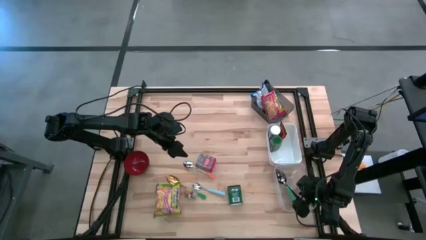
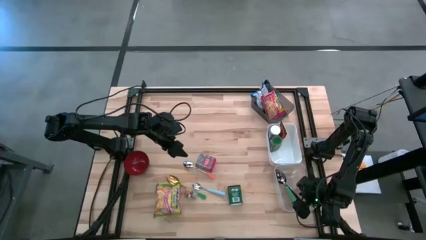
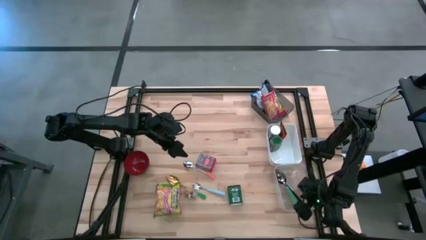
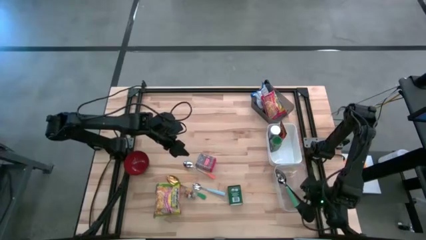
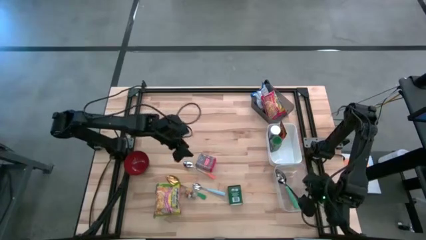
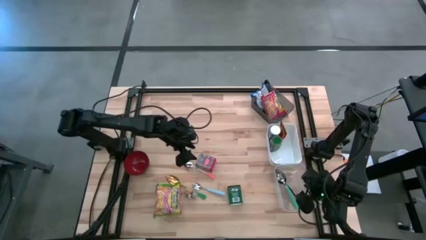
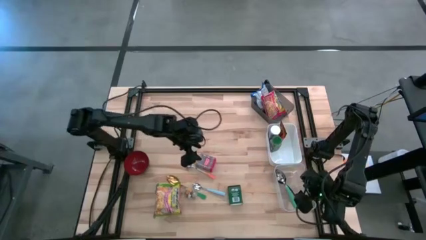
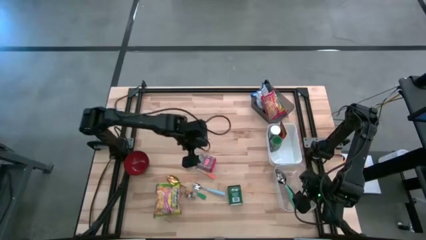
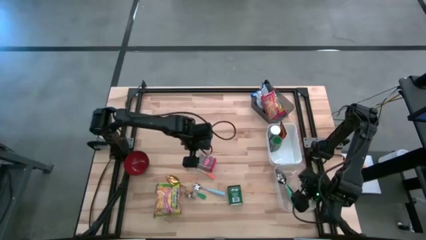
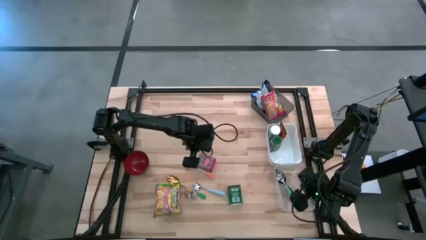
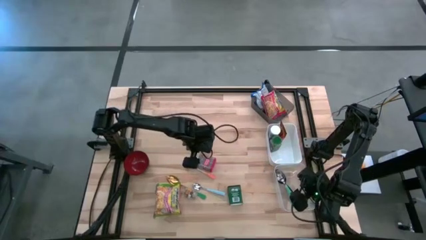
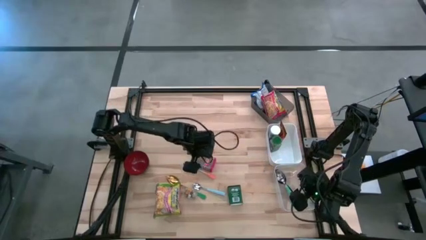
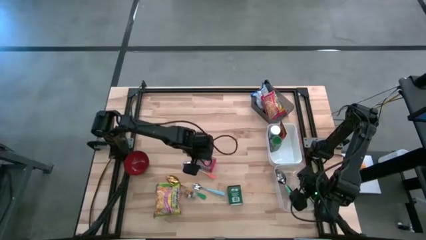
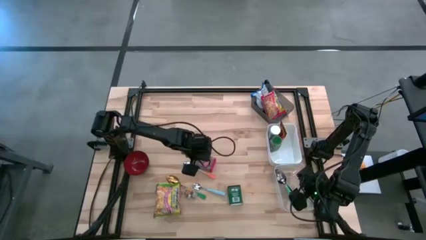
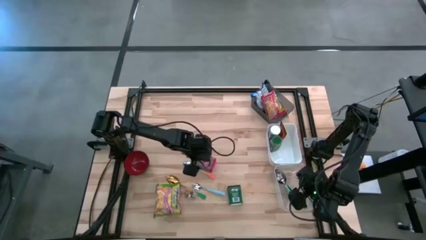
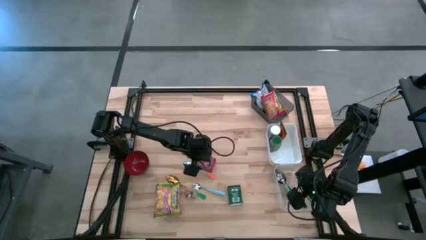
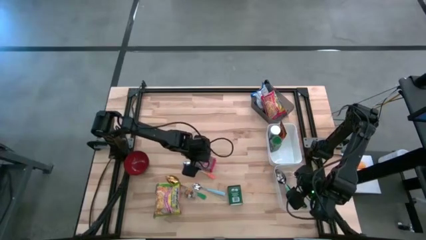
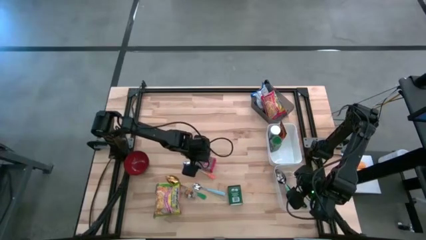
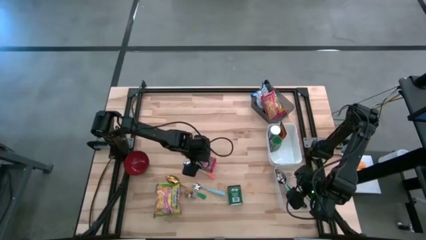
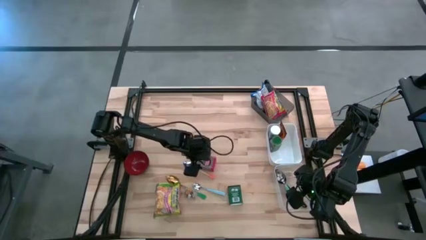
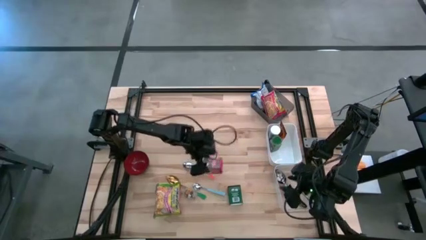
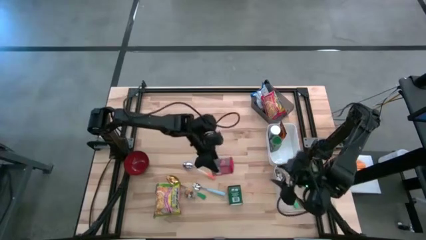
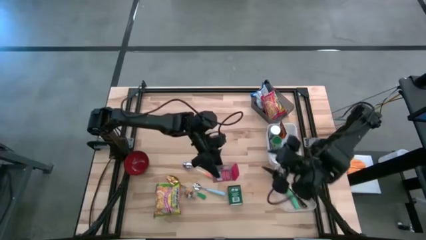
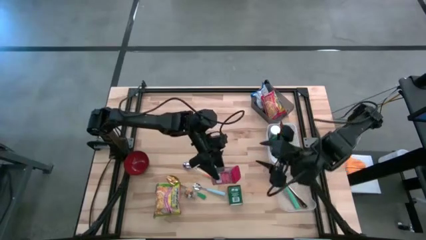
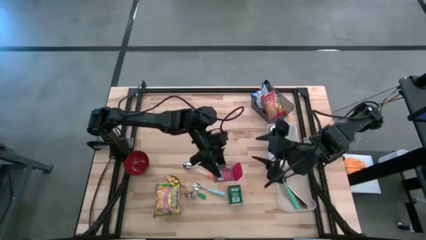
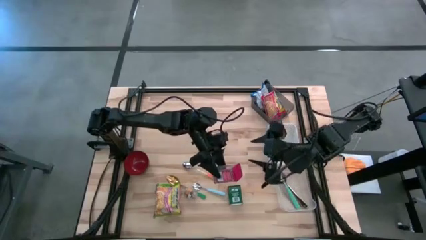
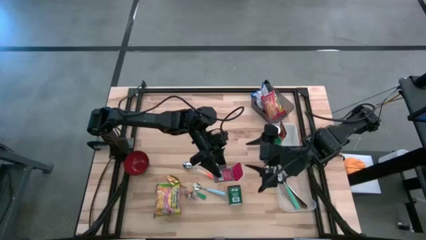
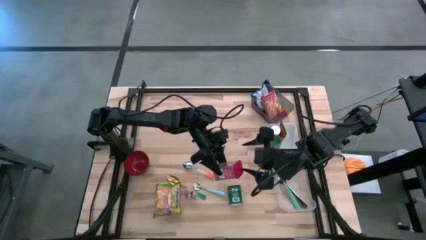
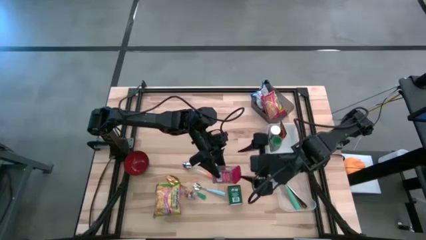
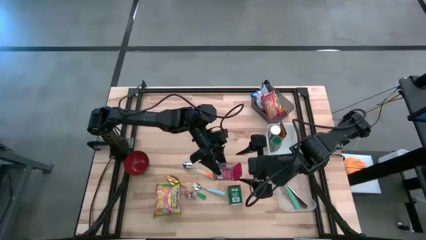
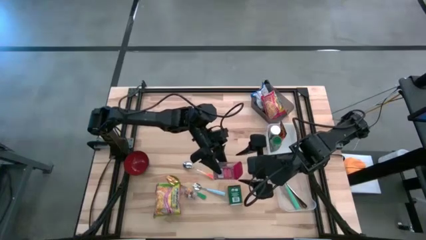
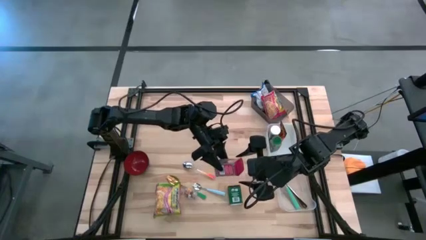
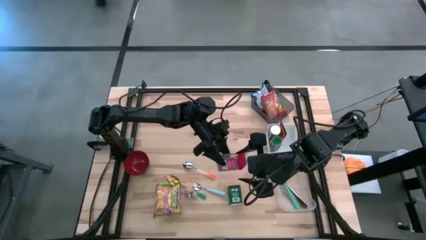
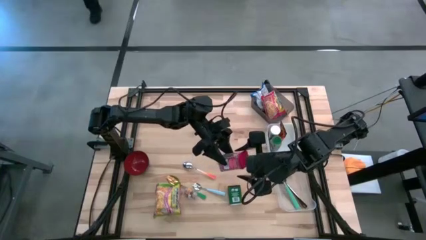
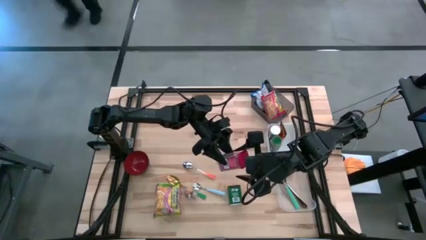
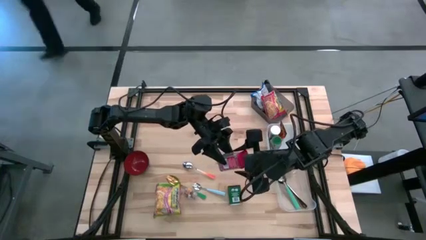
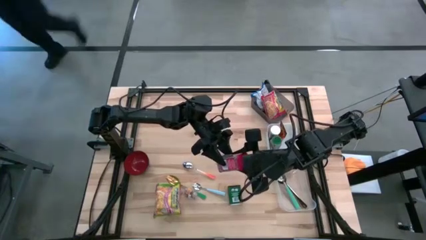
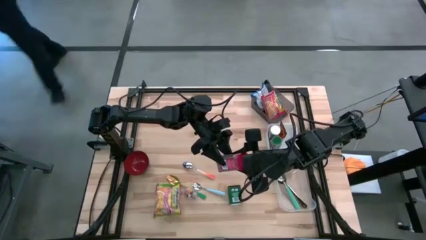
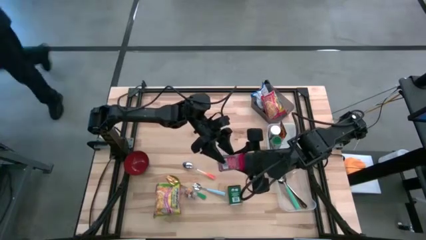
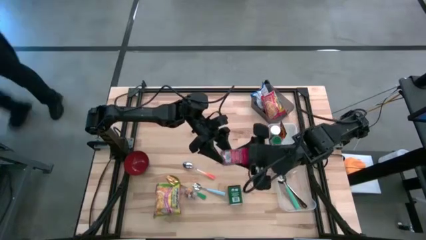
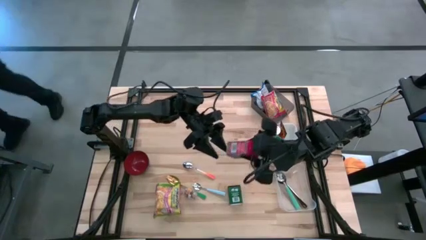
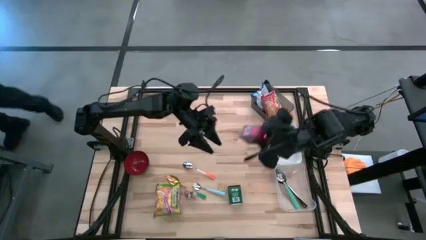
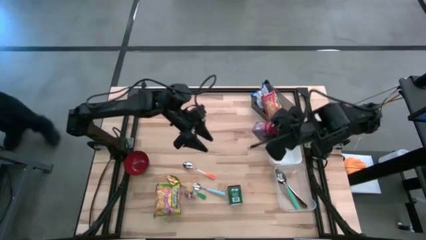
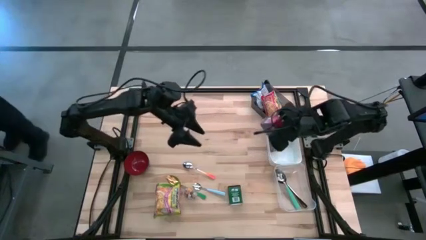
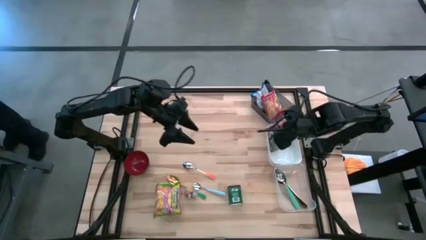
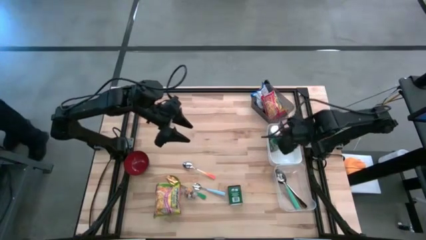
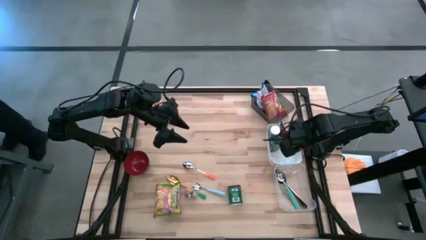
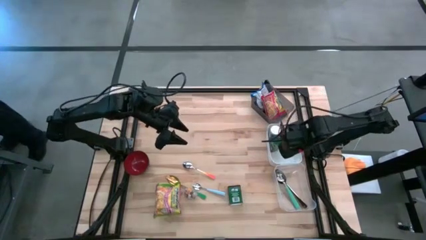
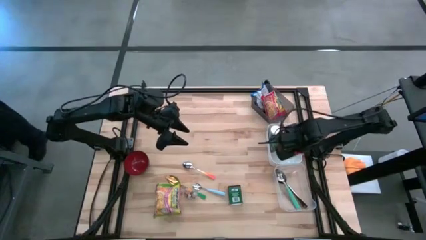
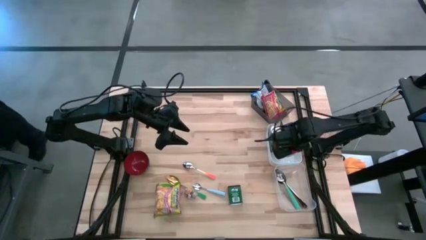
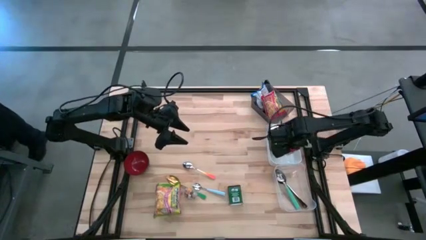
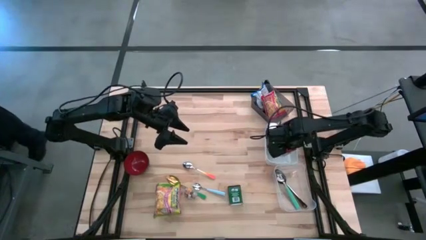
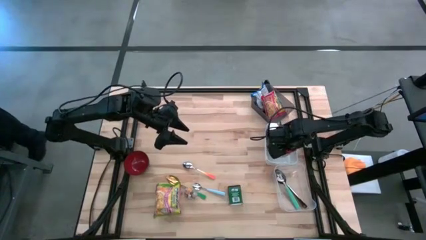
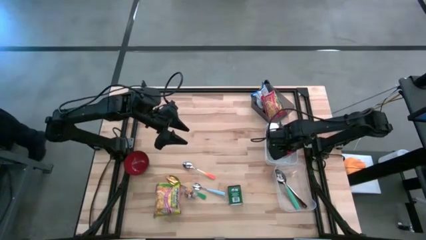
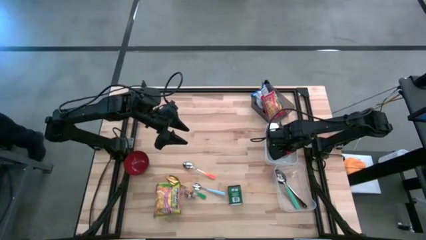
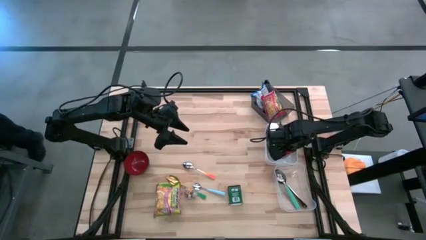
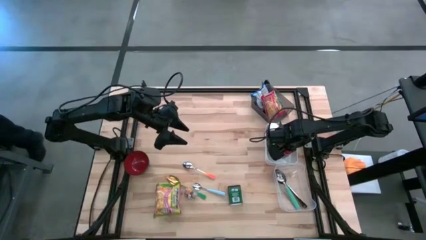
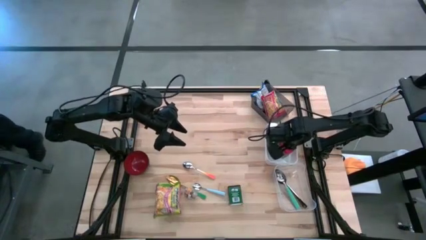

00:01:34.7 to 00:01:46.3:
Put the red seasoning can into the white bin
